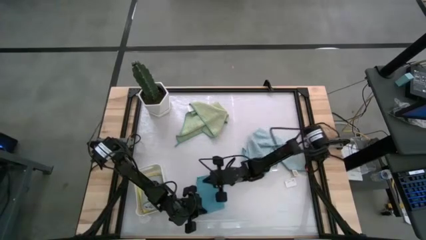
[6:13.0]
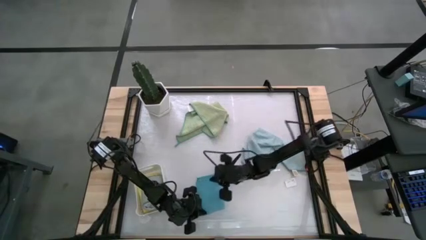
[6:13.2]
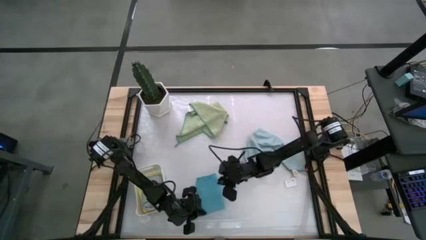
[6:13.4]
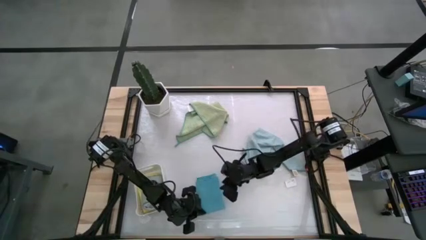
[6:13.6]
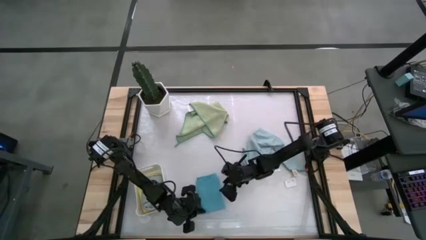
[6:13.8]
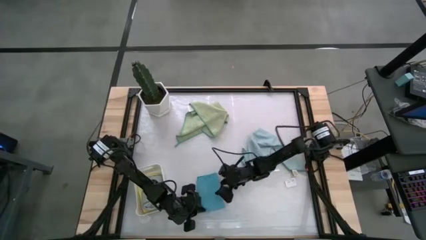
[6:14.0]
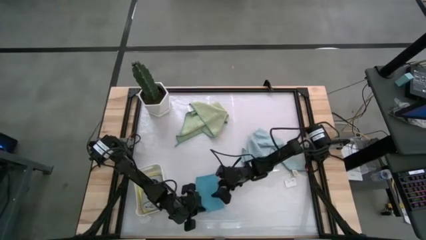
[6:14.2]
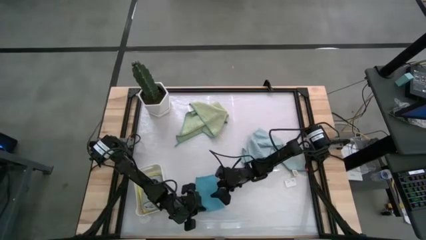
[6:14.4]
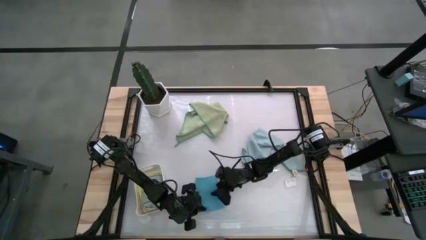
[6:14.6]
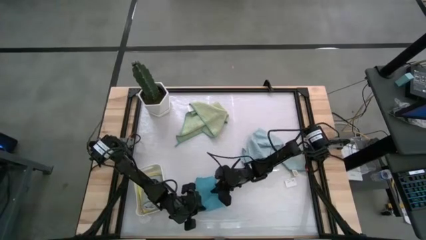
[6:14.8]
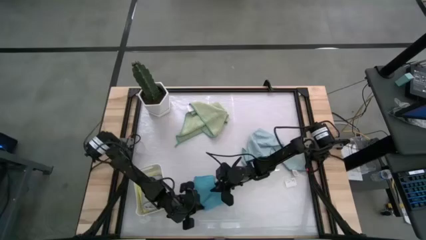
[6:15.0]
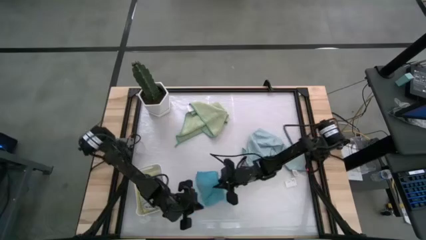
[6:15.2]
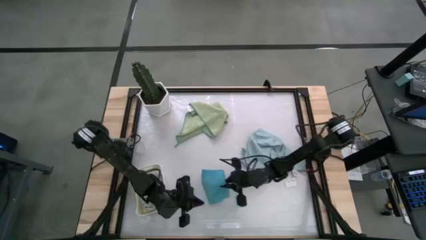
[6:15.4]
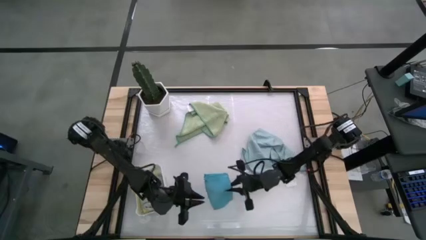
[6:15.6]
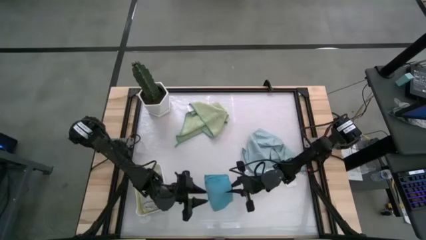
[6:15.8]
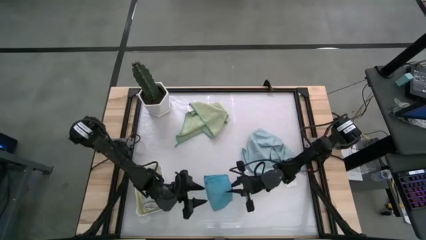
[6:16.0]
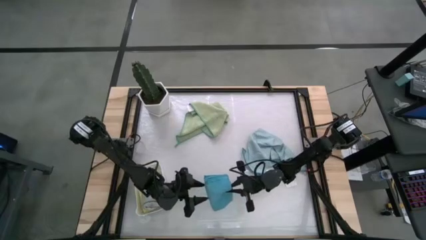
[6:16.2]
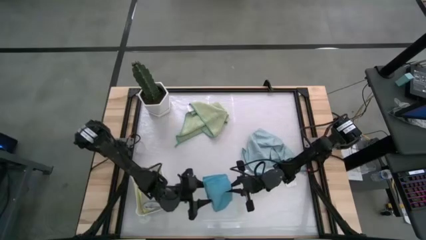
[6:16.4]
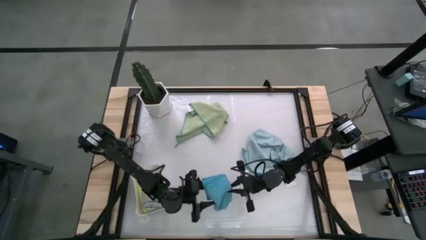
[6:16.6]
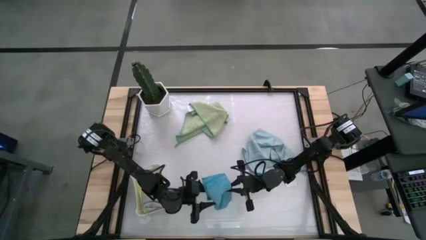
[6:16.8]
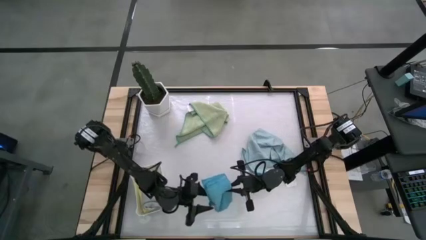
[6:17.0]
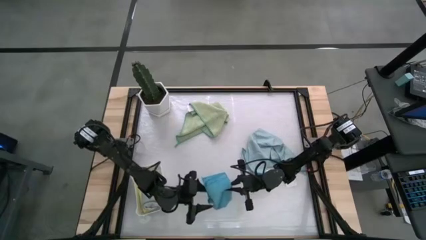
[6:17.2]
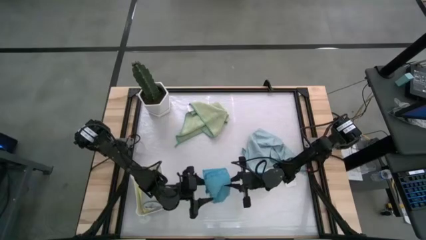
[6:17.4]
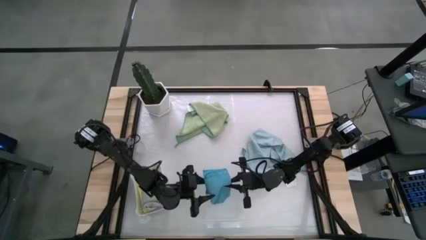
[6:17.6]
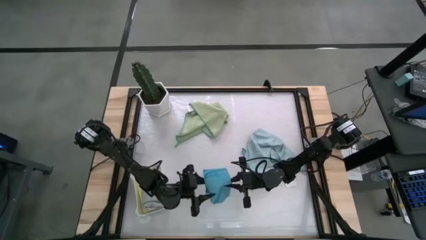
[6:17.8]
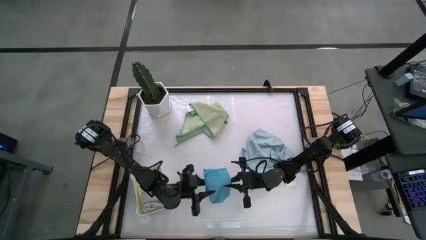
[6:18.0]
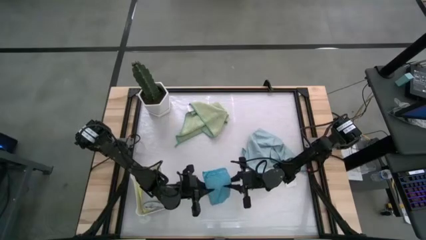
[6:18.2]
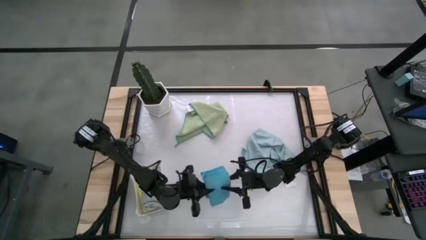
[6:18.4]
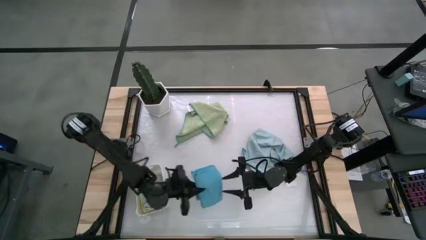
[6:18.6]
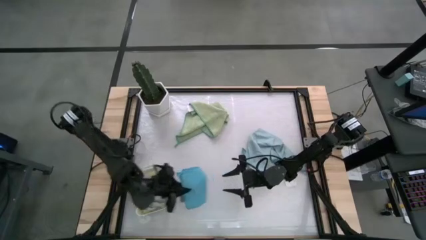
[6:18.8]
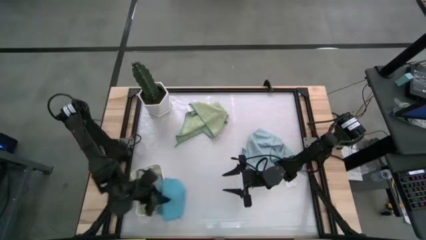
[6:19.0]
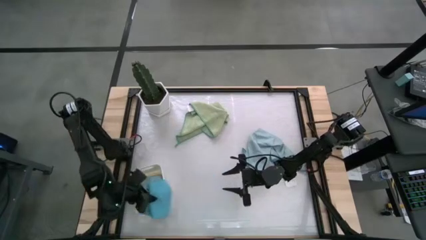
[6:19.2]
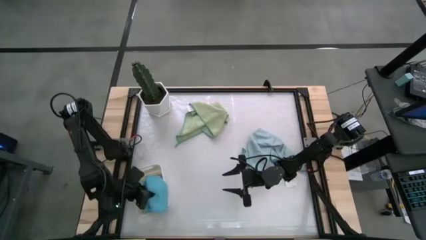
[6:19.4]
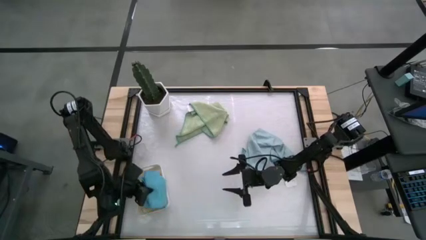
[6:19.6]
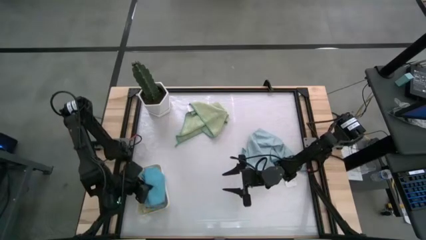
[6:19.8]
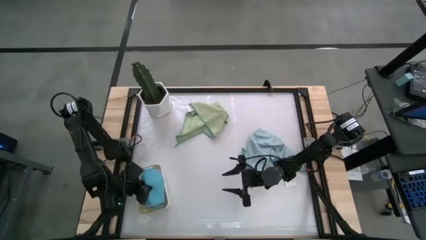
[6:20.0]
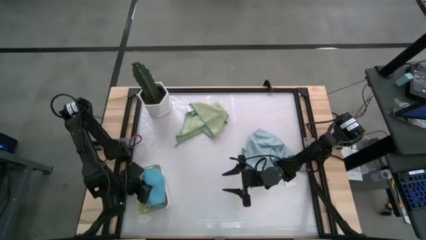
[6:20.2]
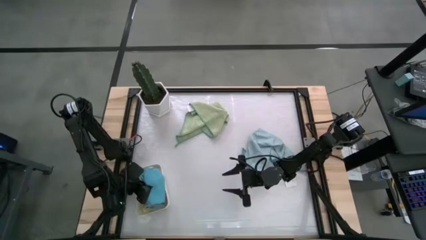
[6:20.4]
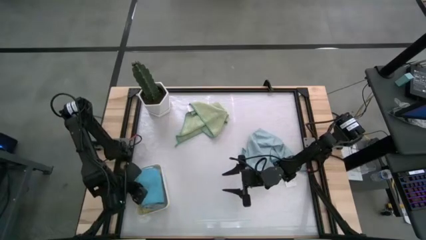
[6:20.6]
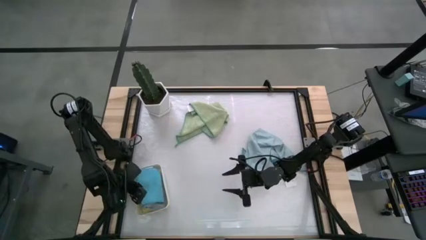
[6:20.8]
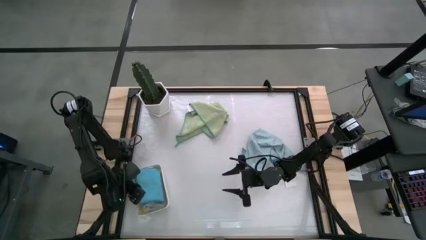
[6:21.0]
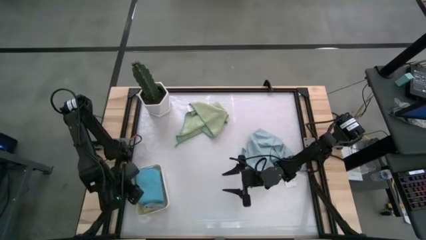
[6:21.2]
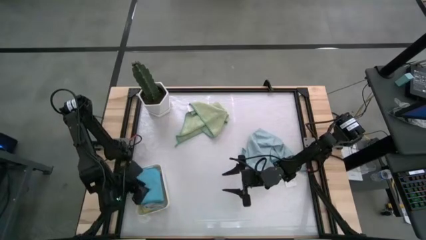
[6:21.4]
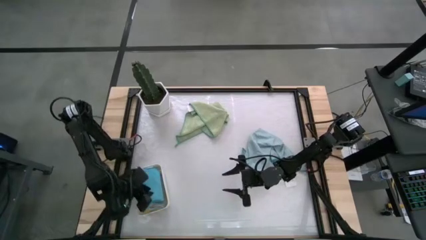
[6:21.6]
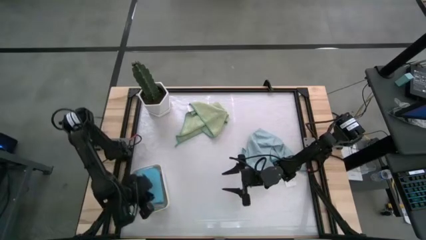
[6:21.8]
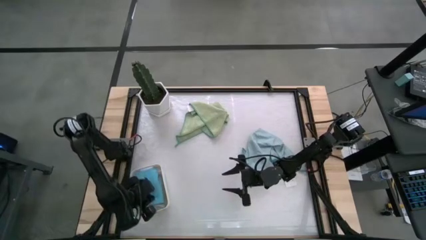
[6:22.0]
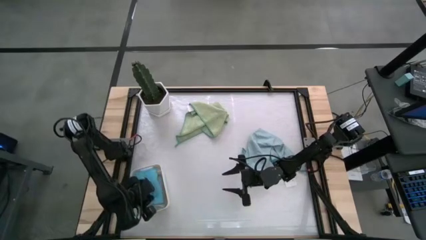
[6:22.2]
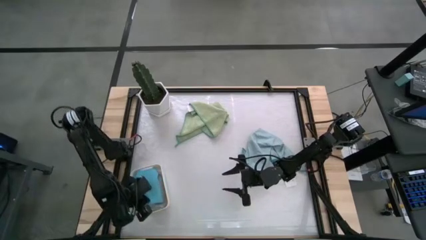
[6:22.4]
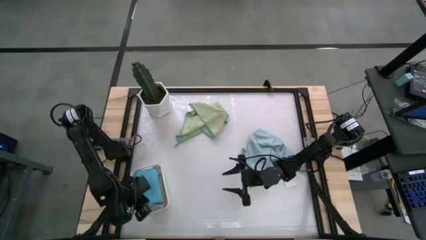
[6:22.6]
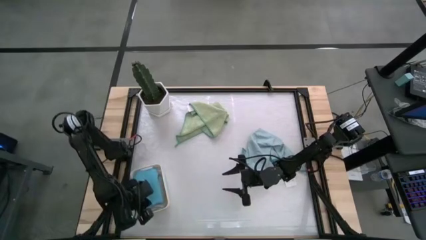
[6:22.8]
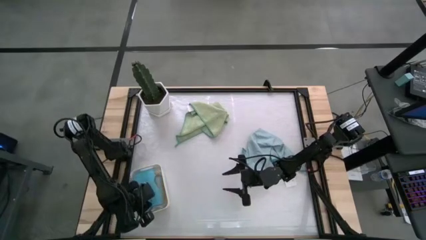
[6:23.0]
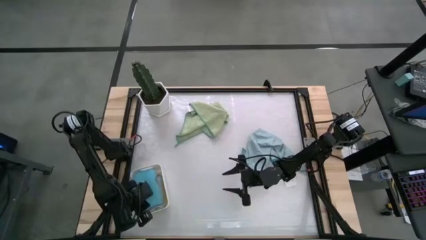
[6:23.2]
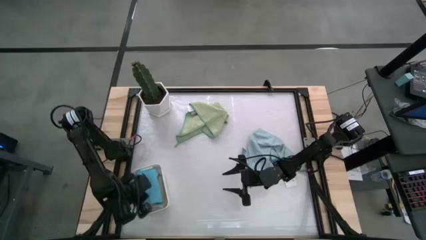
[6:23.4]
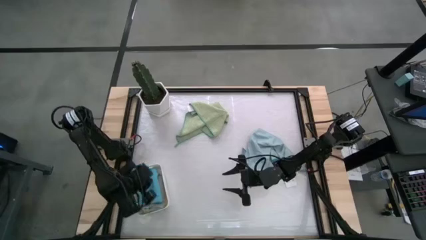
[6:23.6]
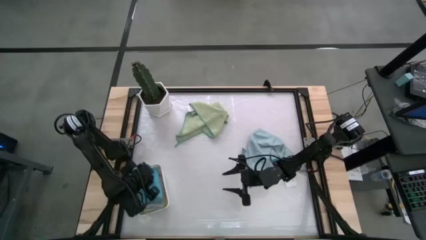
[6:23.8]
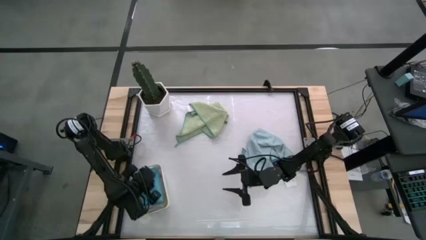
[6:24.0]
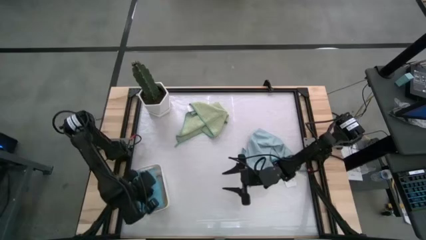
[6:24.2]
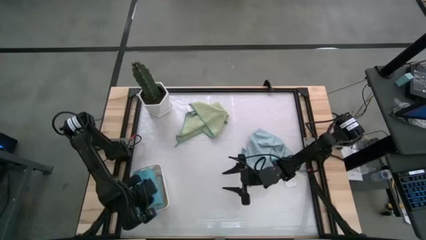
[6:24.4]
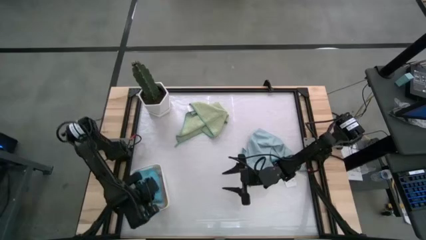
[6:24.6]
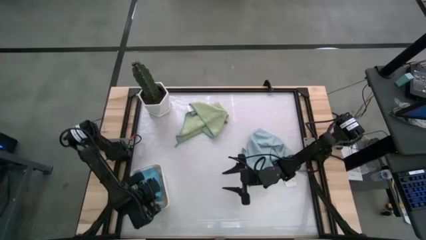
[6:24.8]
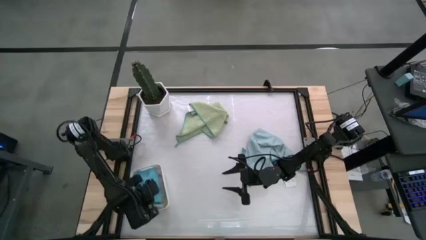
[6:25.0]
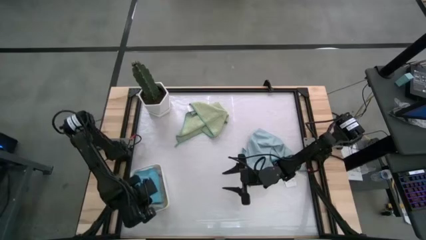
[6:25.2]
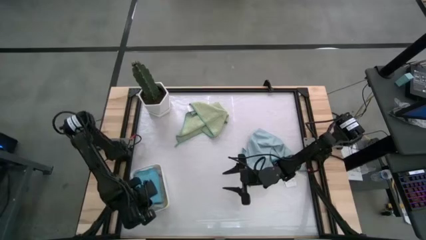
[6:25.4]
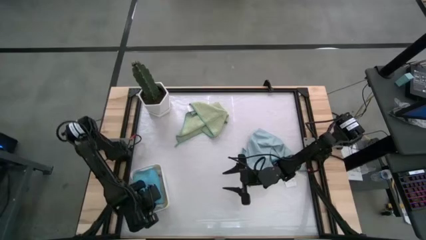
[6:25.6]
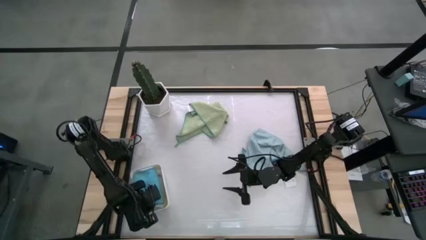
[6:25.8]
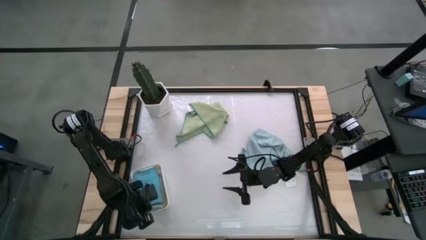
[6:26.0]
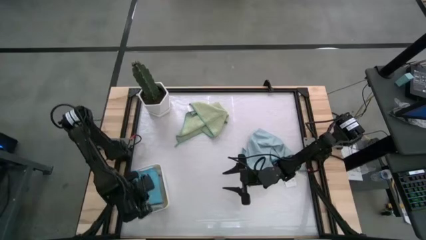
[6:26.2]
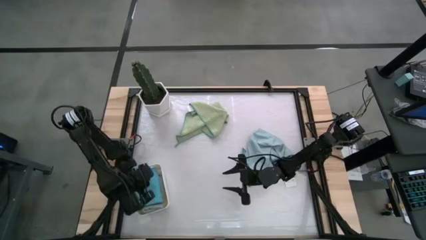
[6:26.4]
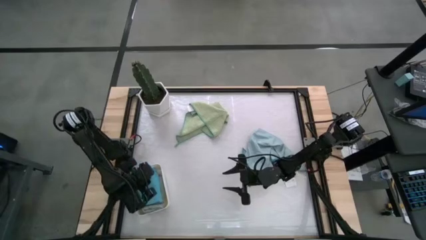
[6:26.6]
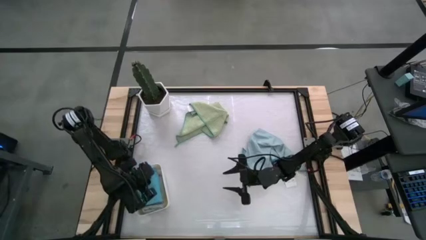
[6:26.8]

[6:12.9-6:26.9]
Task: Fold microfiber towels
Put the blue microfiber into the white bin

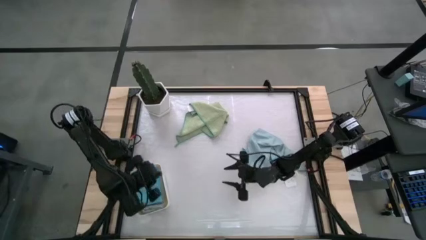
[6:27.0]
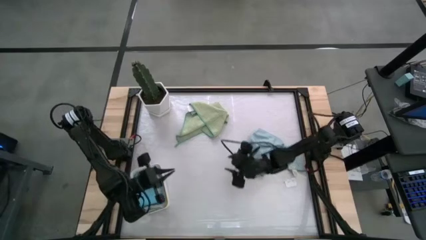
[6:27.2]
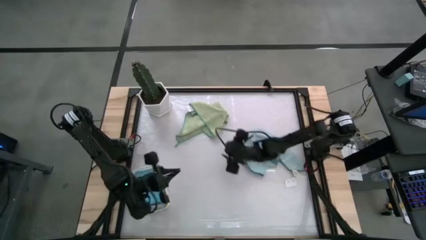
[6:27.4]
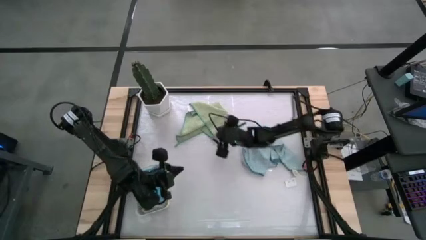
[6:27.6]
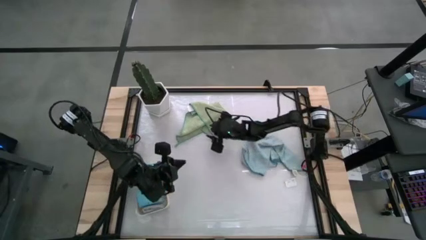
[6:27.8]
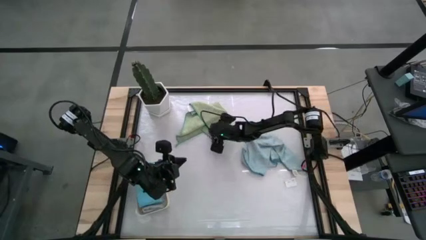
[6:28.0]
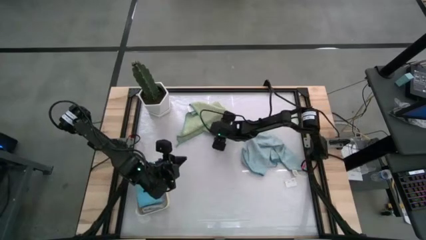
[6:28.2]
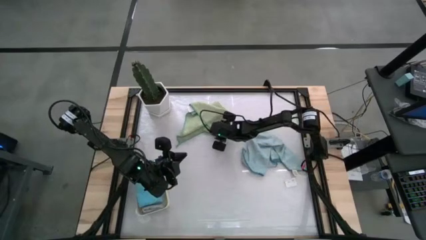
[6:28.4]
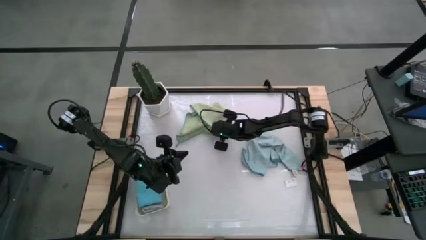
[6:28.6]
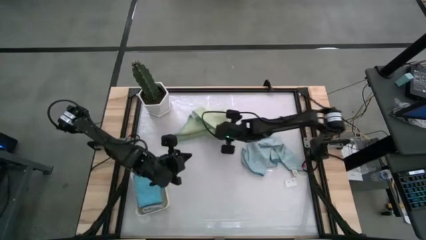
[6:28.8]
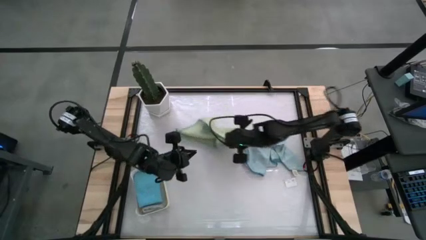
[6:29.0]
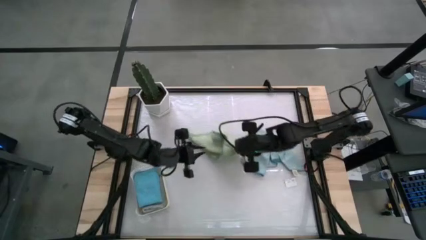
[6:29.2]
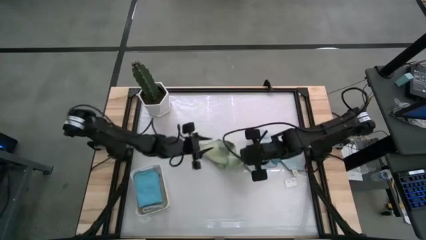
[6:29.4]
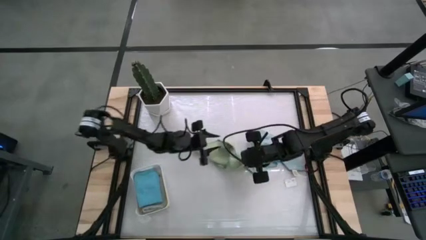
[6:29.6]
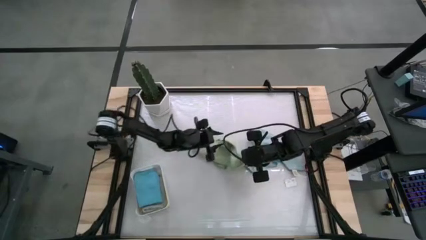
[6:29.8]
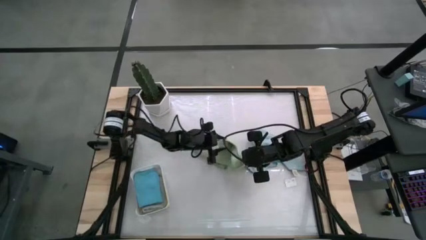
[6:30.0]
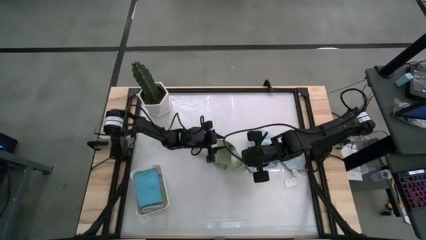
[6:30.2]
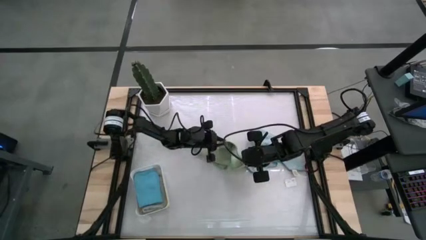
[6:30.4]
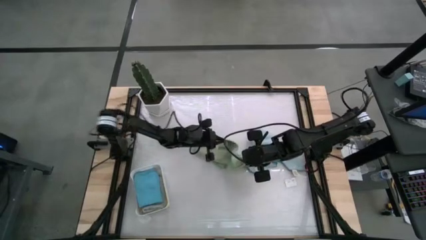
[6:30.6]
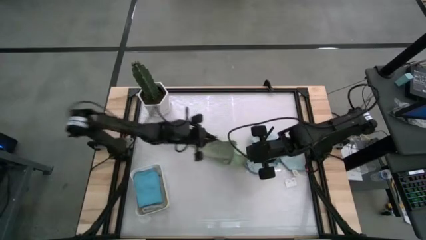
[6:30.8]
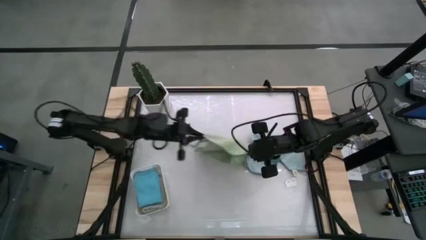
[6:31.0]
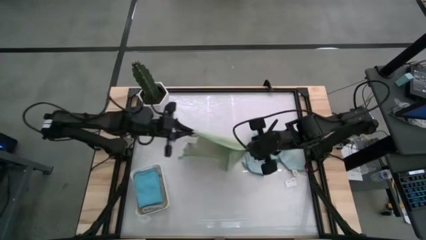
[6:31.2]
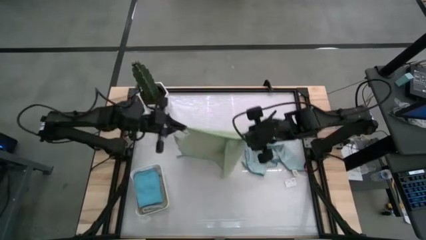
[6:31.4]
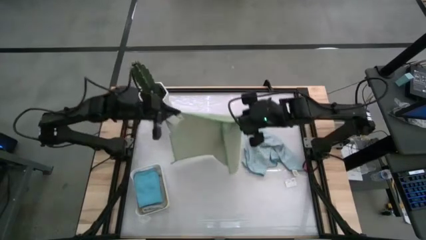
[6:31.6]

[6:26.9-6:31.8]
Fold the green microfiber towel
